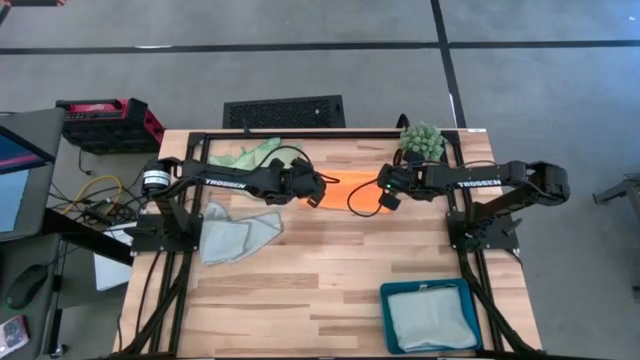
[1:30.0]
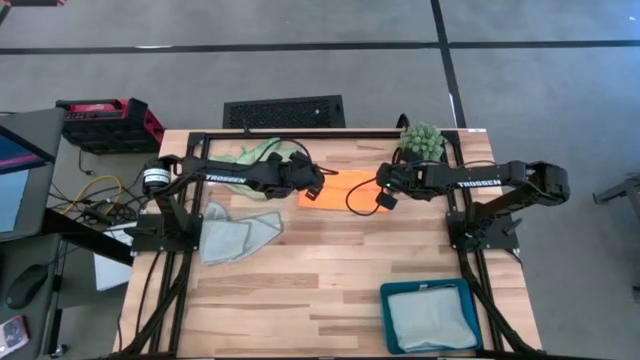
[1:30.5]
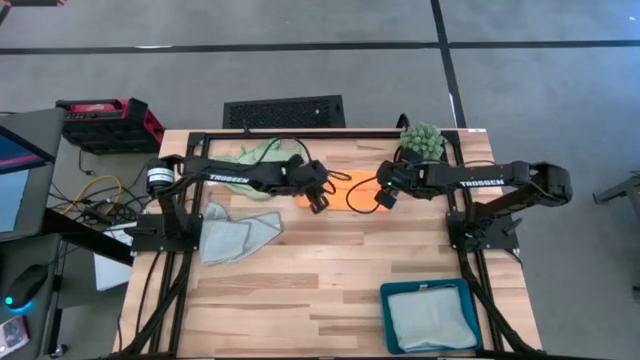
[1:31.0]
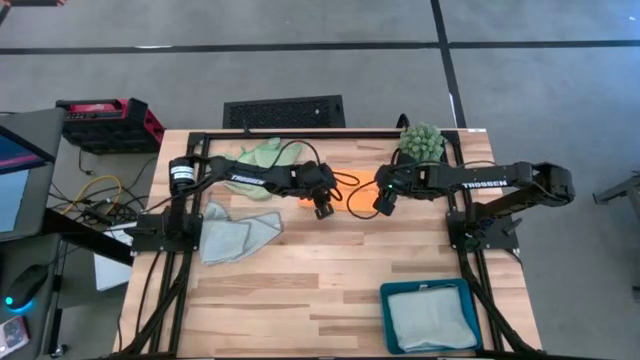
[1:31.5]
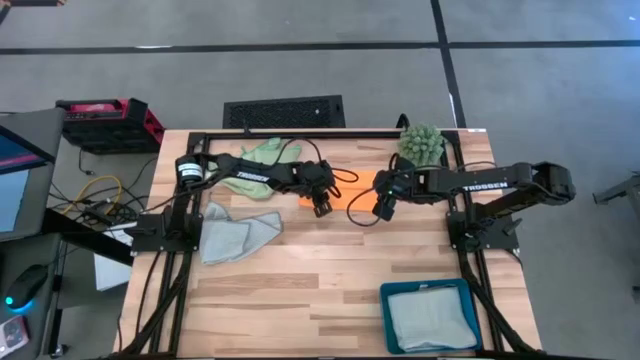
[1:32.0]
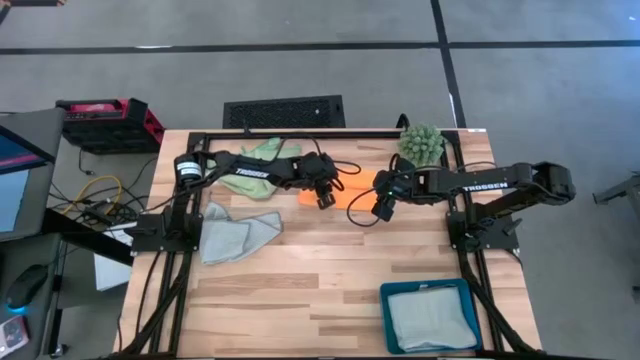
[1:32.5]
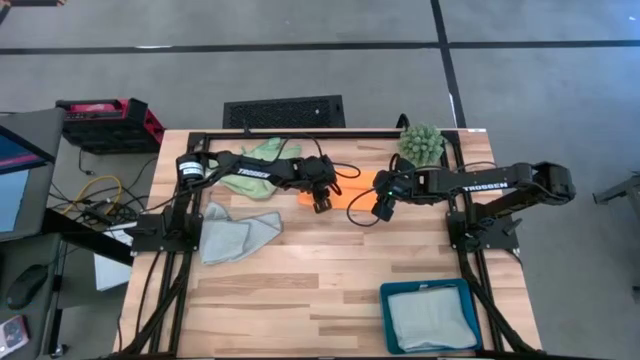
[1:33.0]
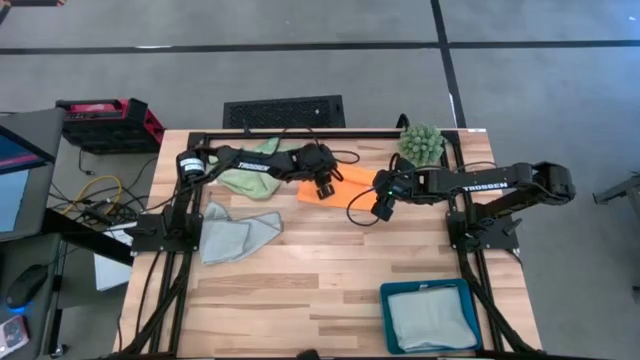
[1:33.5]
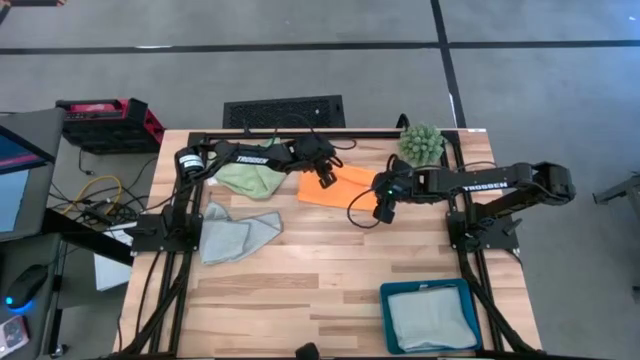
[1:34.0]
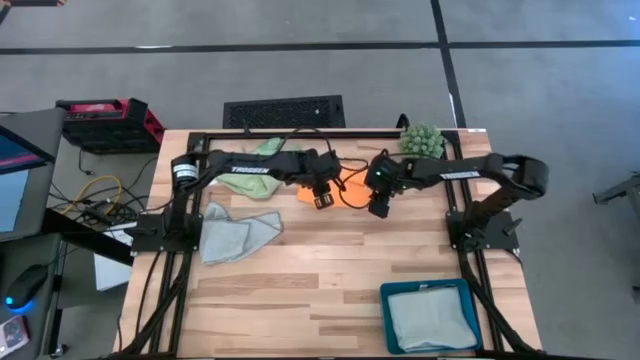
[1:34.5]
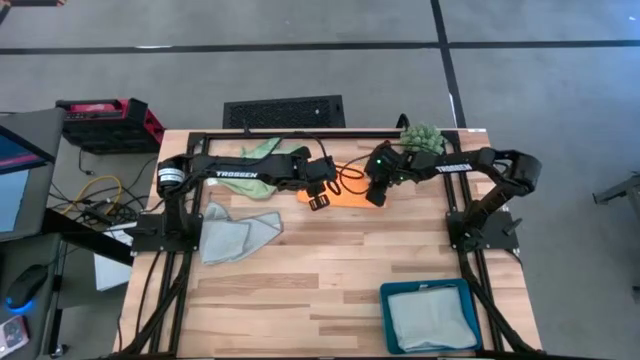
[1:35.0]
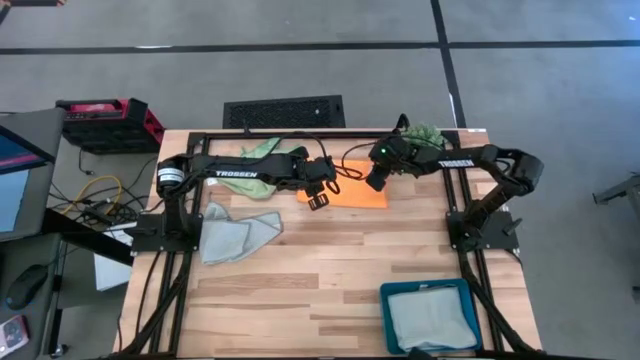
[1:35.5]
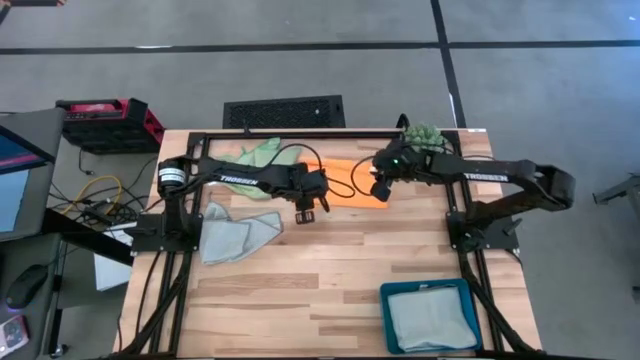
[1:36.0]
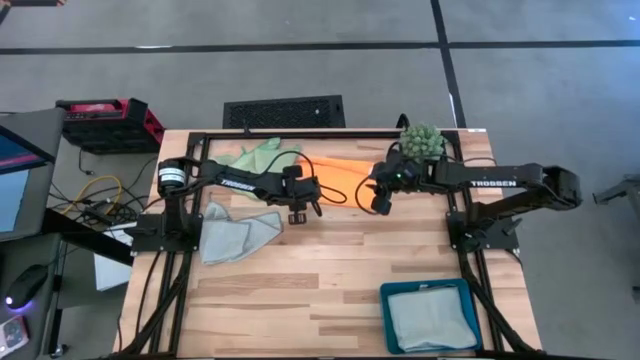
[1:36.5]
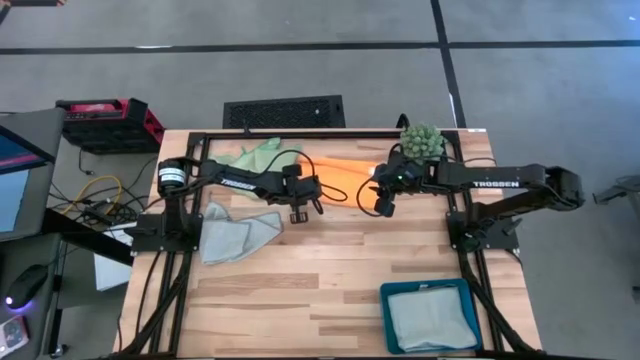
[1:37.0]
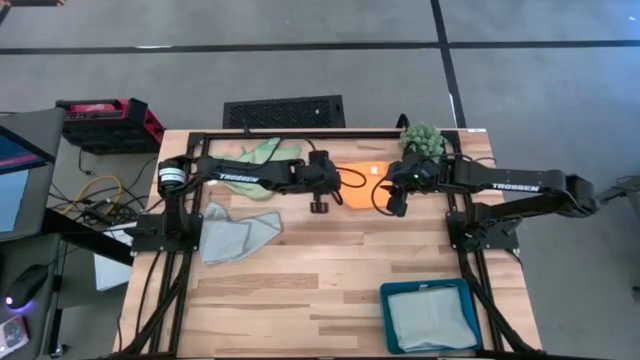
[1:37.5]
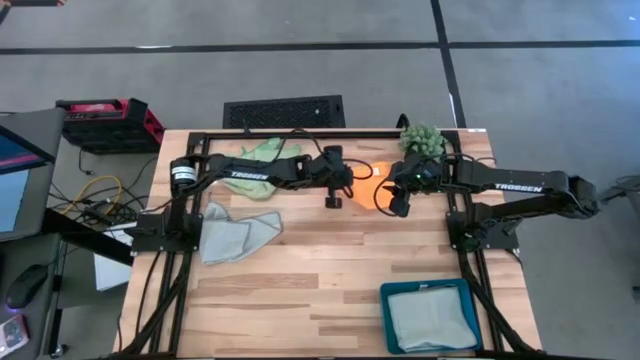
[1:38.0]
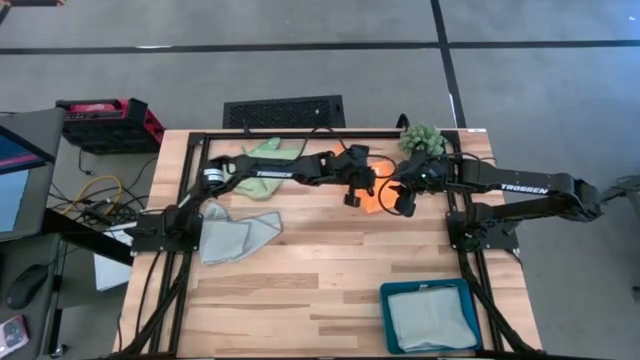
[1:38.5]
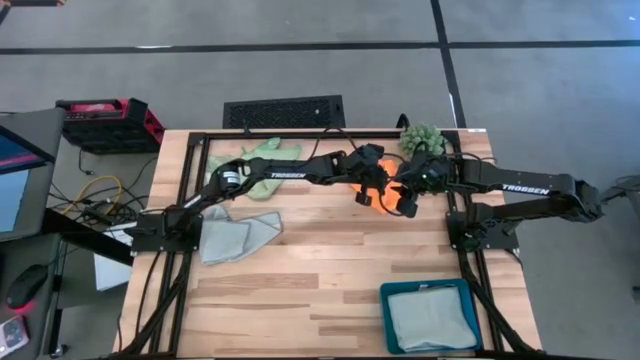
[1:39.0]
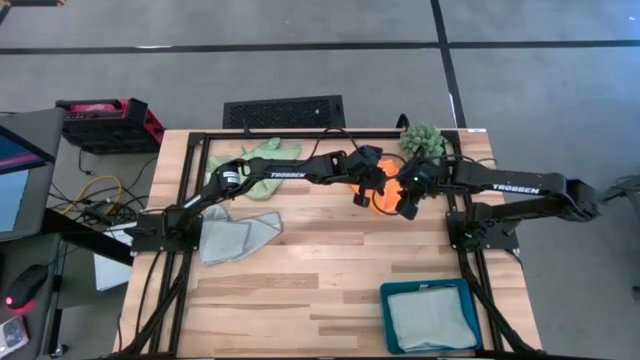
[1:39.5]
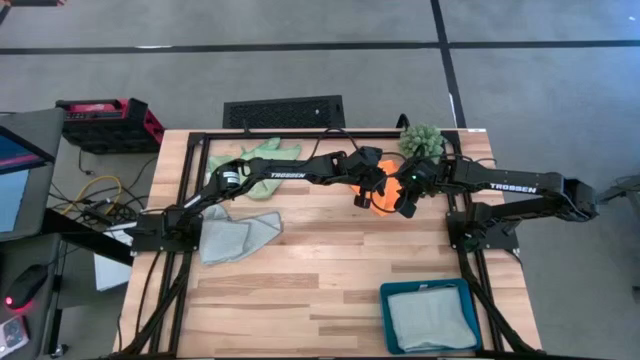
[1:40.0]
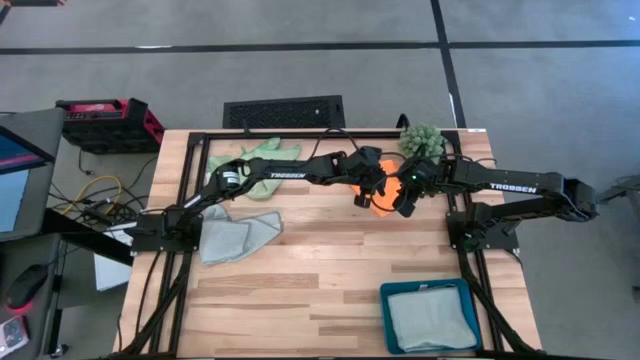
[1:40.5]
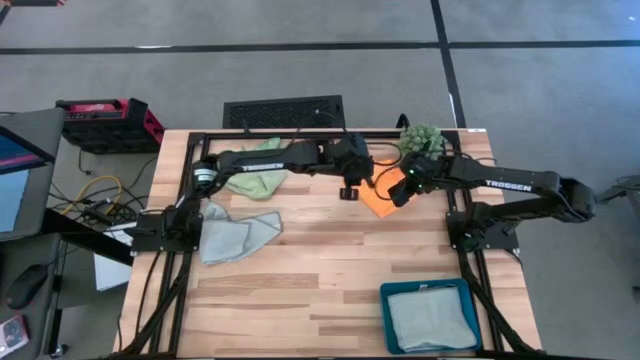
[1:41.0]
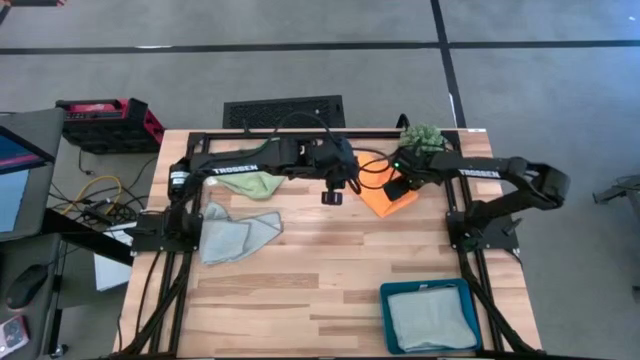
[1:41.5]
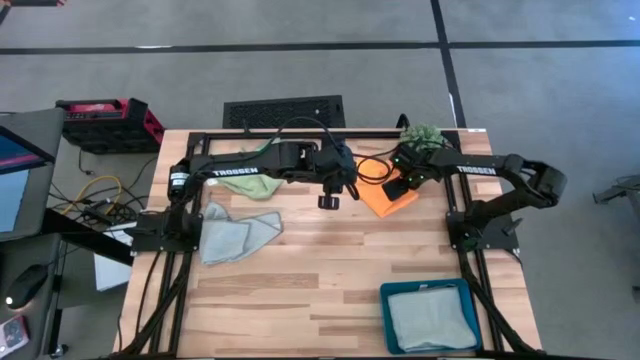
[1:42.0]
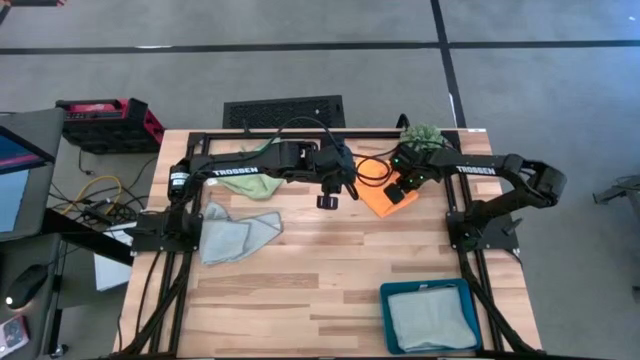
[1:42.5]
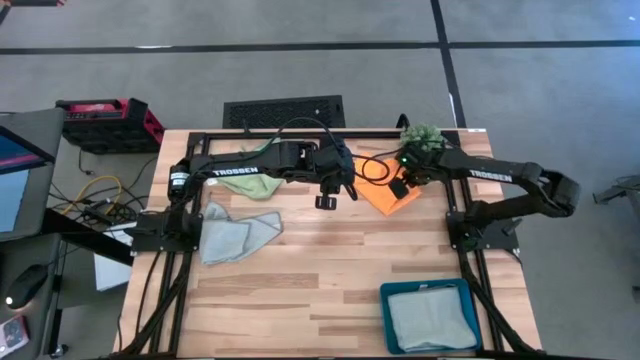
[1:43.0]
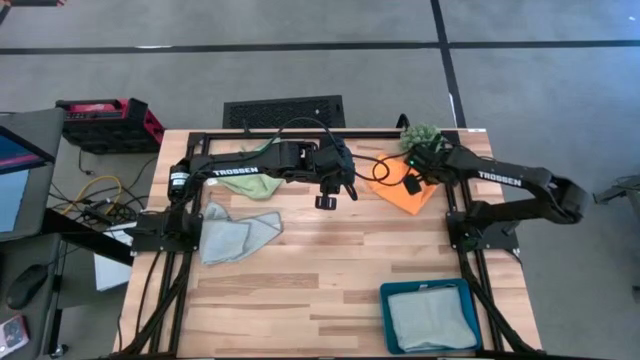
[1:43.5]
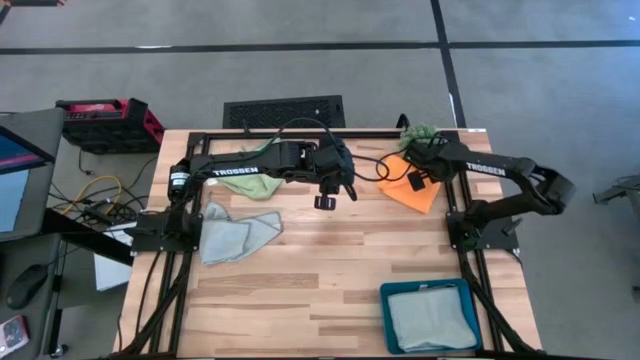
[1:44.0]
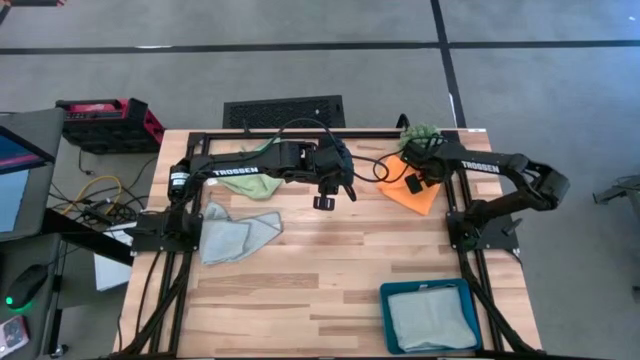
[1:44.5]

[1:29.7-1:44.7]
Task: Fold microfiber towels
Fold the orange towel

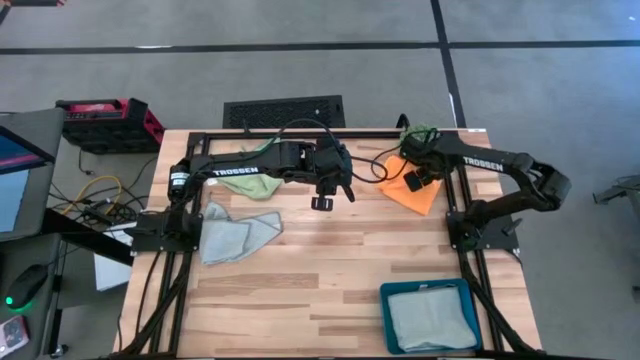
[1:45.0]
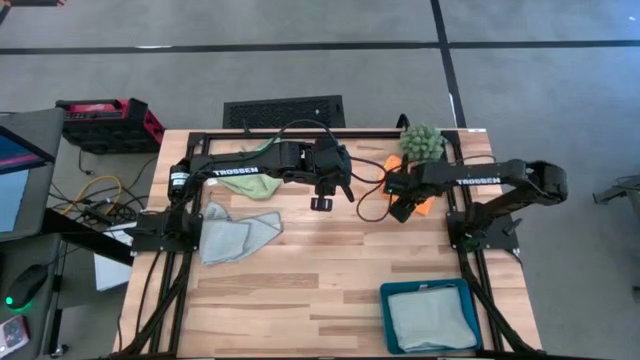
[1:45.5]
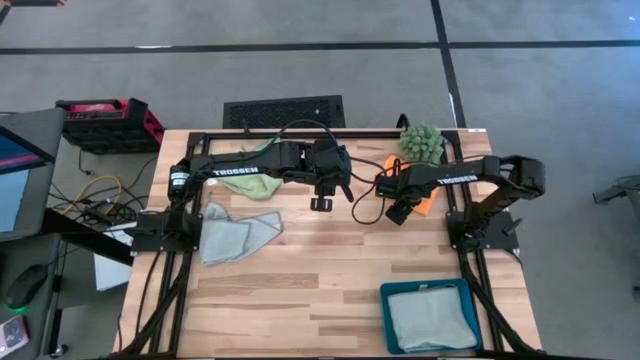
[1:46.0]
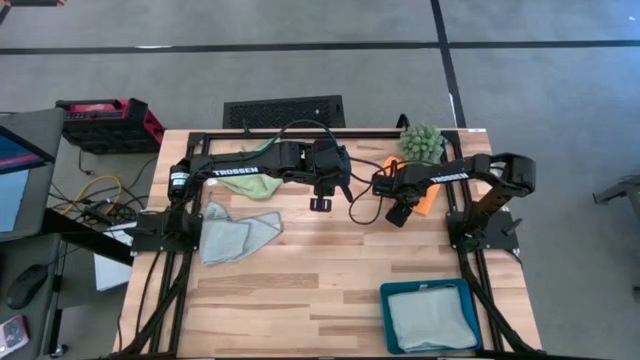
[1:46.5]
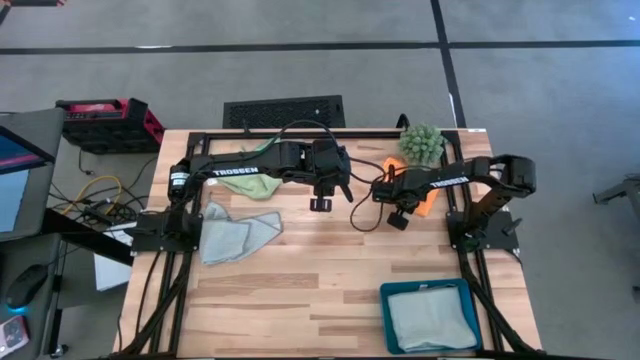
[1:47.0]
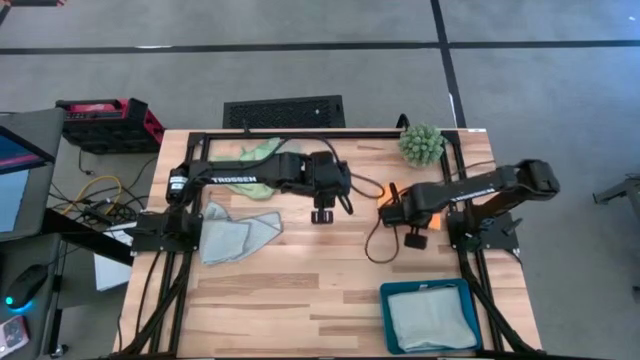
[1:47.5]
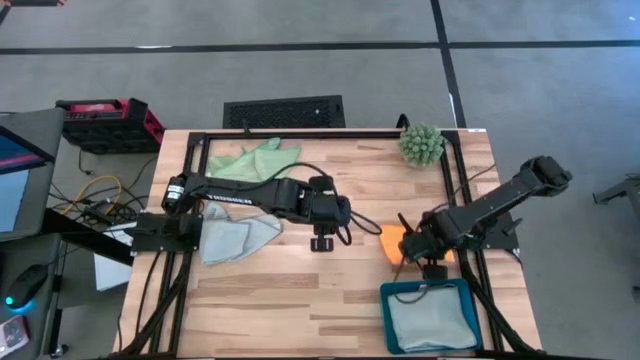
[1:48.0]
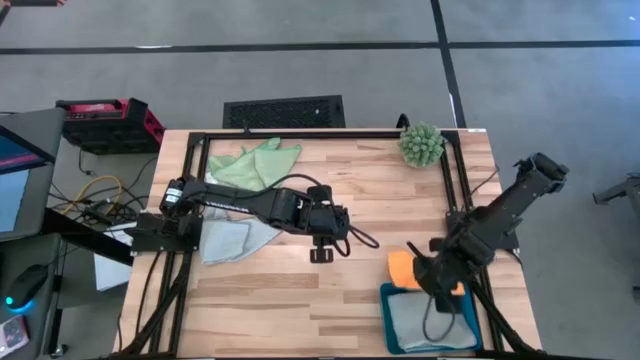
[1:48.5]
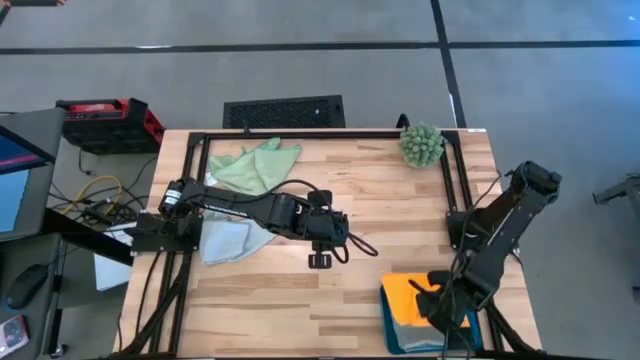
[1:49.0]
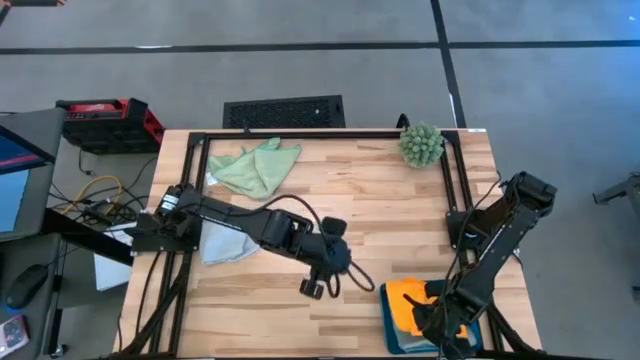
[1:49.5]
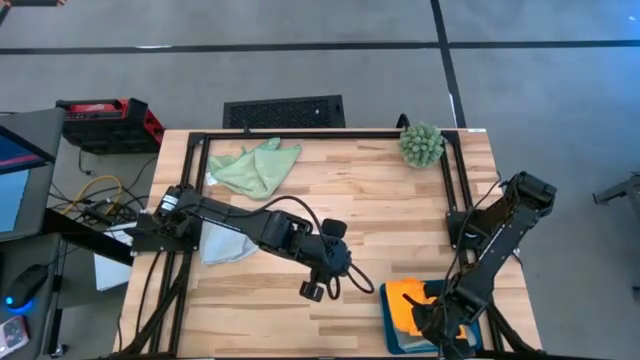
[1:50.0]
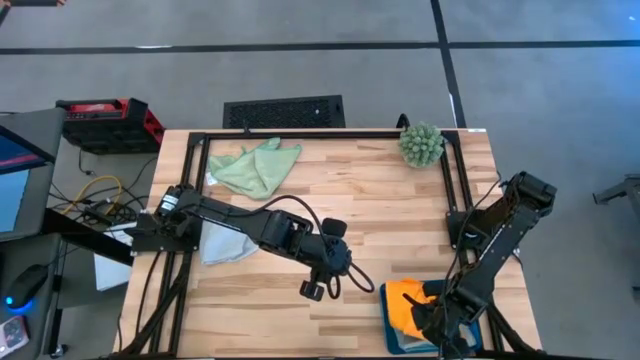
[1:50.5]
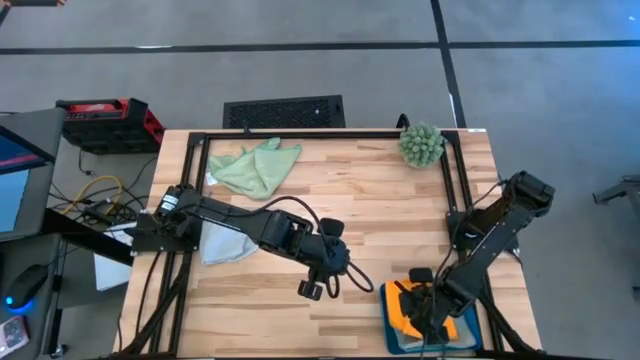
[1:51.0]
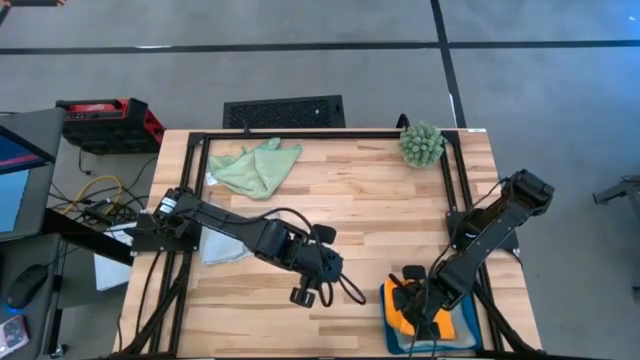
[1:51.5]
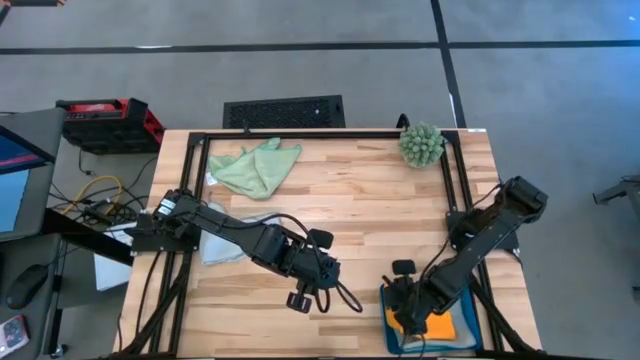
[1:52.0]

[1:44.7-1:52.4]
Put the folded orange towel into the blue bin
